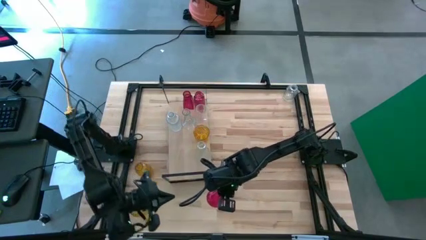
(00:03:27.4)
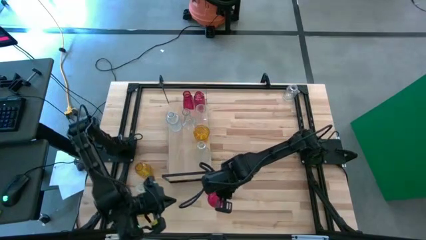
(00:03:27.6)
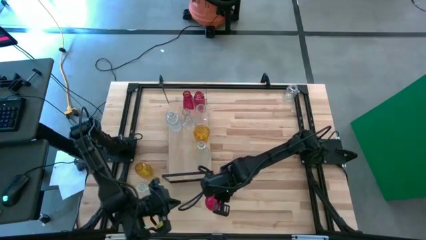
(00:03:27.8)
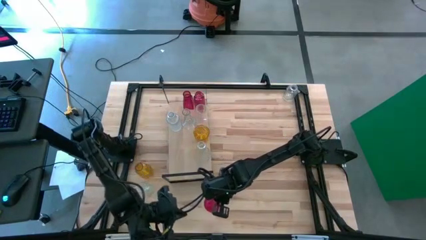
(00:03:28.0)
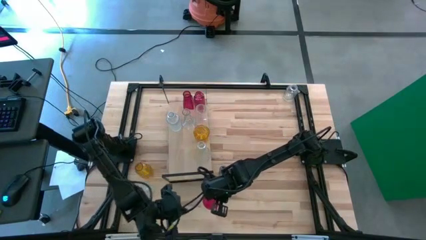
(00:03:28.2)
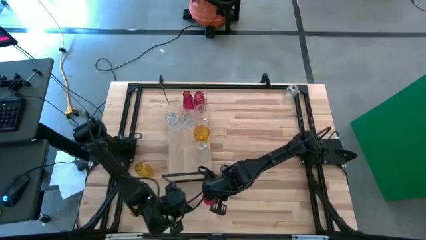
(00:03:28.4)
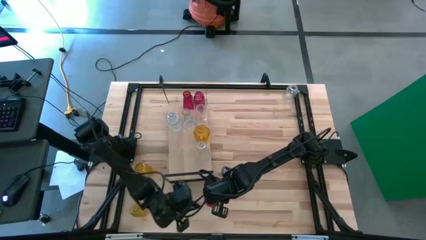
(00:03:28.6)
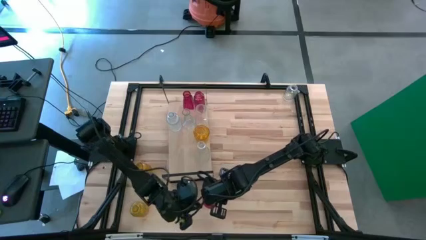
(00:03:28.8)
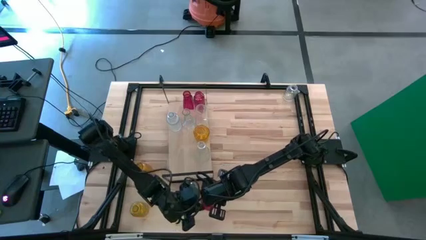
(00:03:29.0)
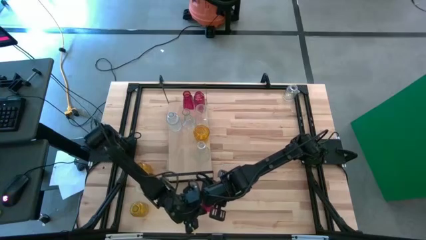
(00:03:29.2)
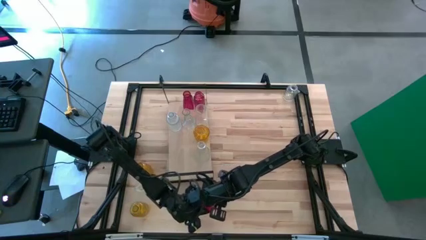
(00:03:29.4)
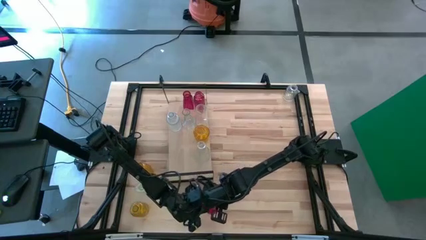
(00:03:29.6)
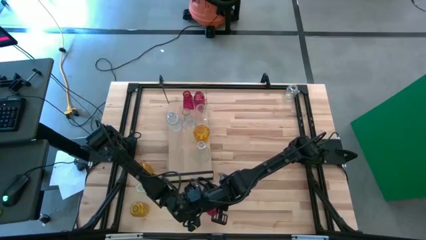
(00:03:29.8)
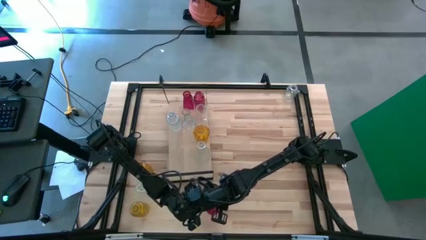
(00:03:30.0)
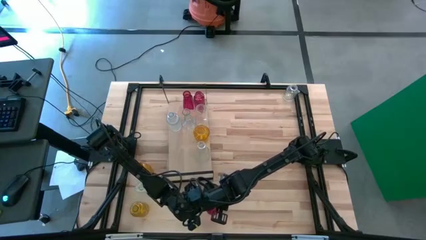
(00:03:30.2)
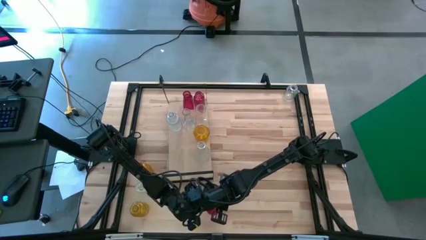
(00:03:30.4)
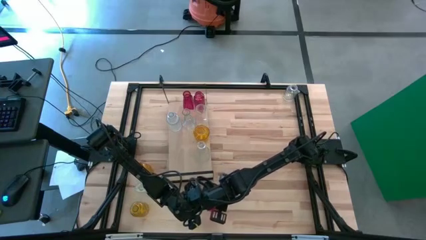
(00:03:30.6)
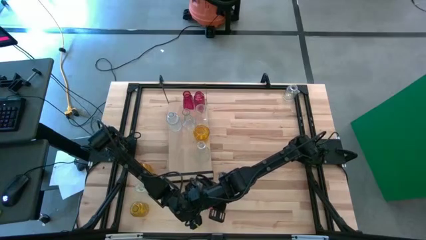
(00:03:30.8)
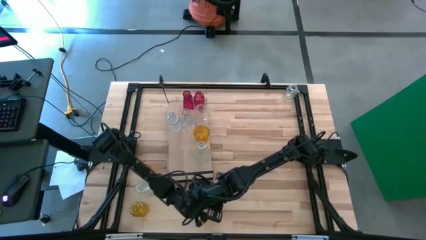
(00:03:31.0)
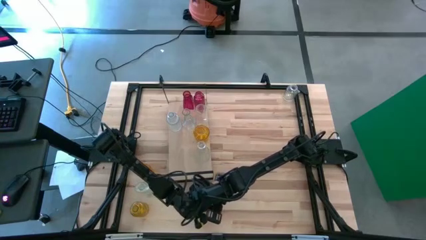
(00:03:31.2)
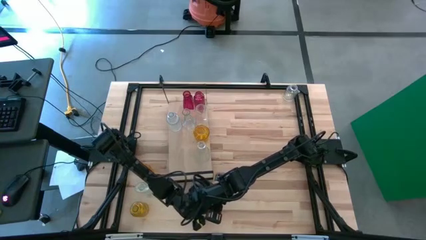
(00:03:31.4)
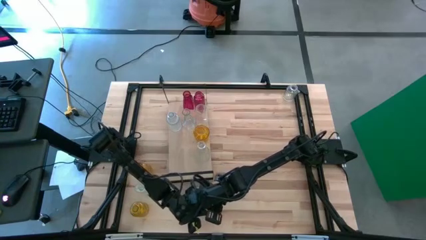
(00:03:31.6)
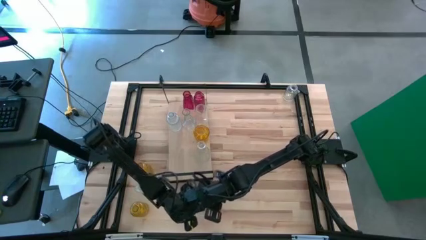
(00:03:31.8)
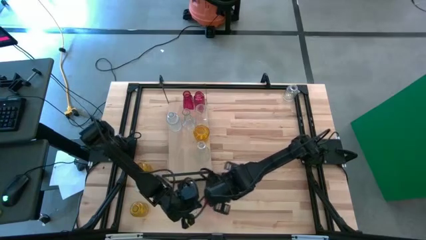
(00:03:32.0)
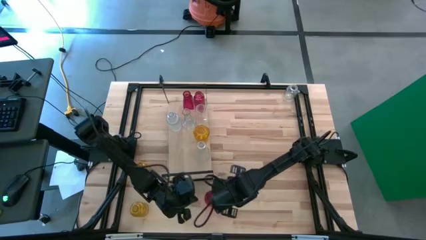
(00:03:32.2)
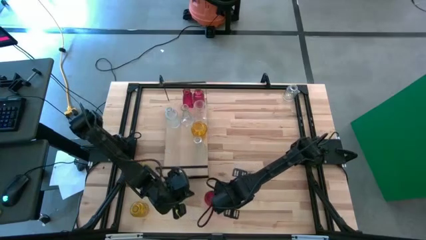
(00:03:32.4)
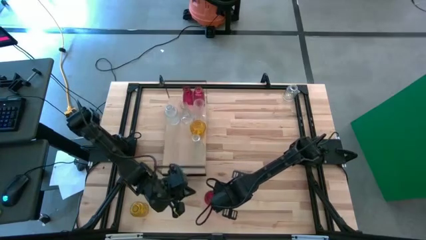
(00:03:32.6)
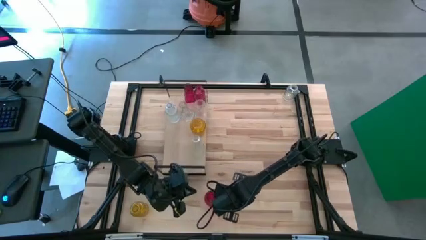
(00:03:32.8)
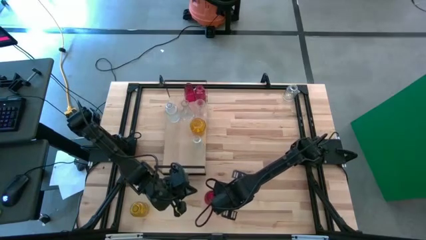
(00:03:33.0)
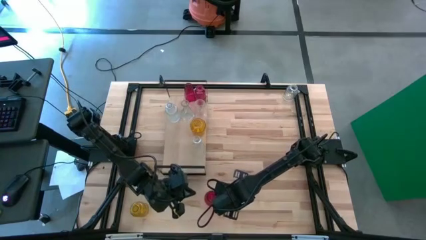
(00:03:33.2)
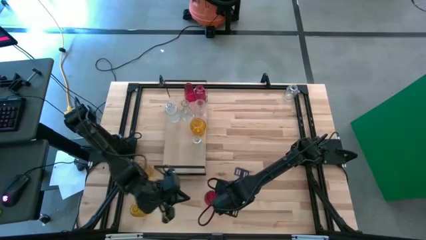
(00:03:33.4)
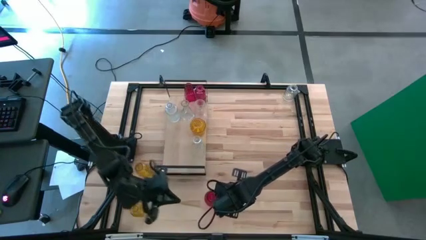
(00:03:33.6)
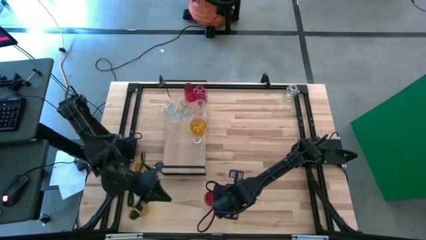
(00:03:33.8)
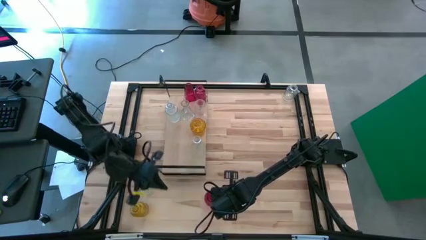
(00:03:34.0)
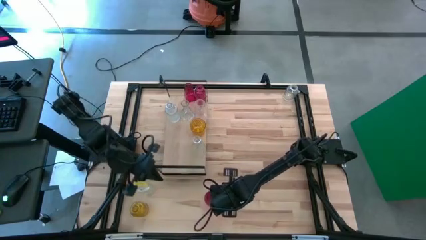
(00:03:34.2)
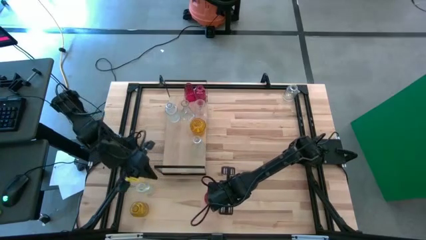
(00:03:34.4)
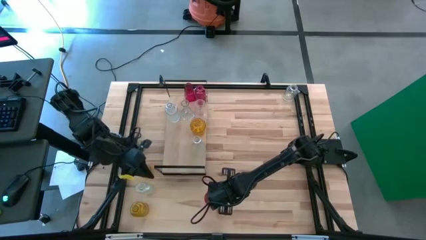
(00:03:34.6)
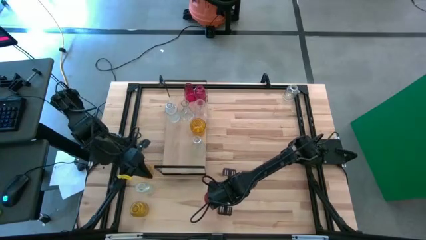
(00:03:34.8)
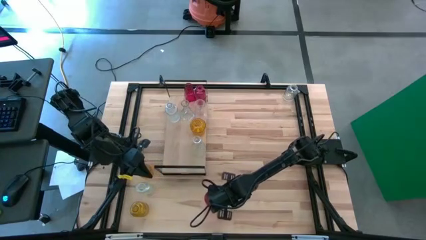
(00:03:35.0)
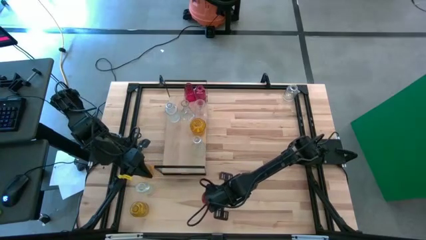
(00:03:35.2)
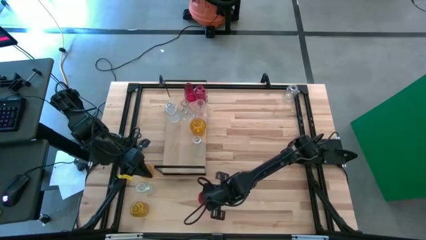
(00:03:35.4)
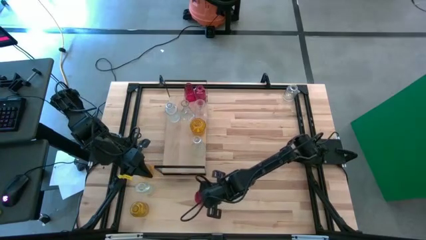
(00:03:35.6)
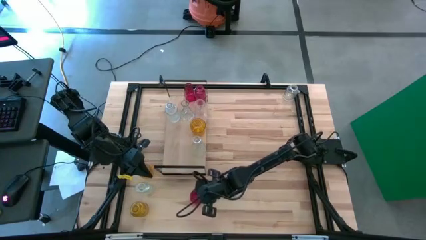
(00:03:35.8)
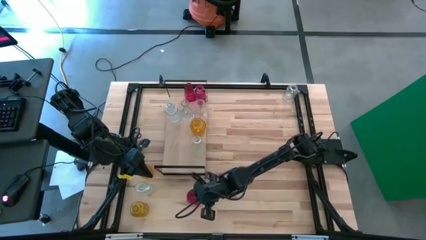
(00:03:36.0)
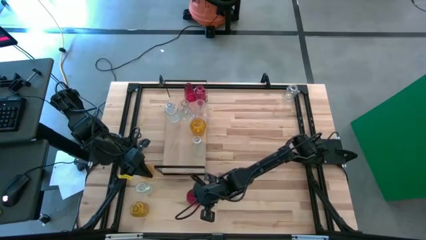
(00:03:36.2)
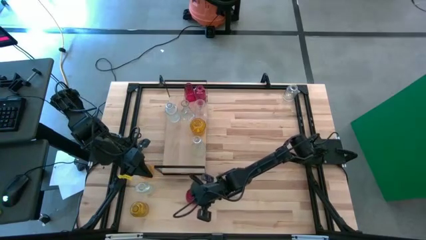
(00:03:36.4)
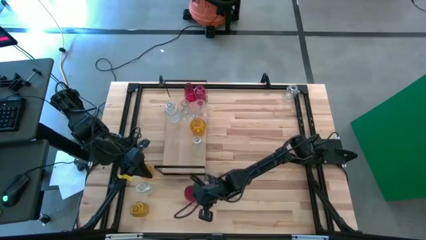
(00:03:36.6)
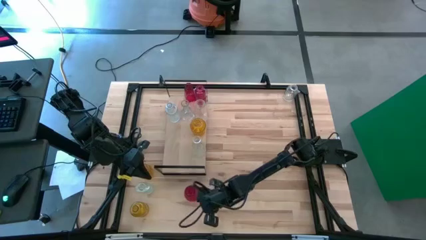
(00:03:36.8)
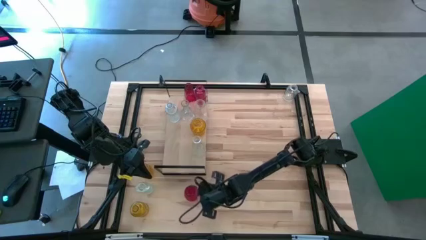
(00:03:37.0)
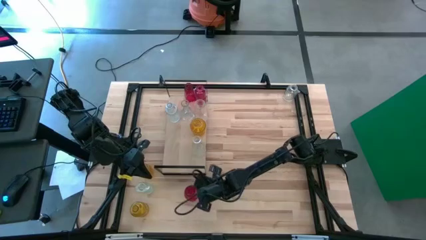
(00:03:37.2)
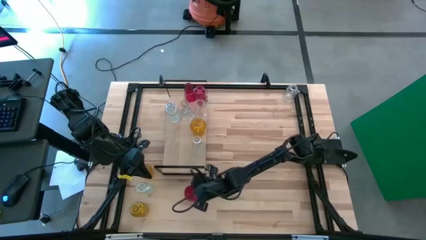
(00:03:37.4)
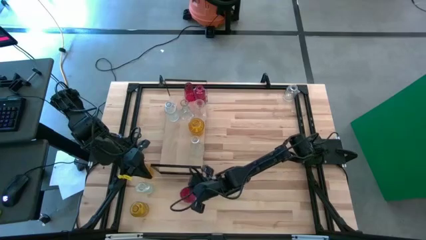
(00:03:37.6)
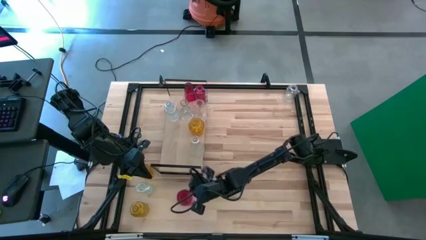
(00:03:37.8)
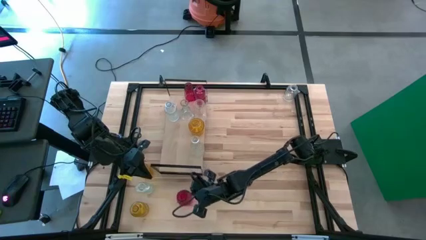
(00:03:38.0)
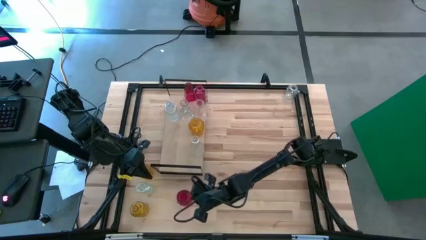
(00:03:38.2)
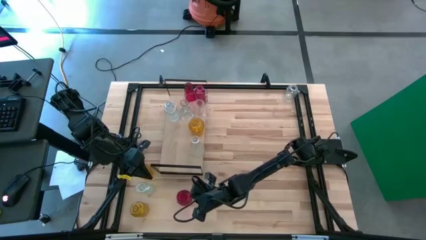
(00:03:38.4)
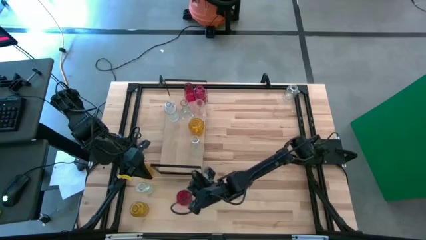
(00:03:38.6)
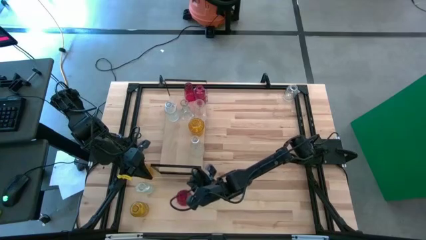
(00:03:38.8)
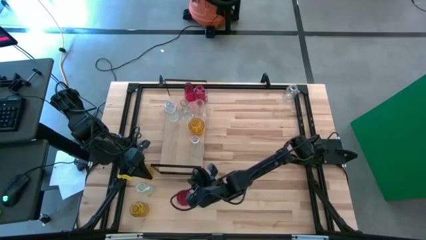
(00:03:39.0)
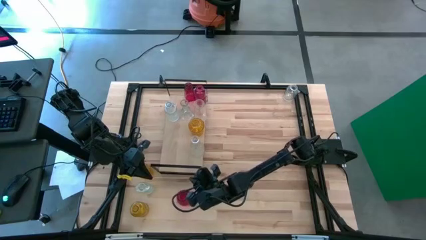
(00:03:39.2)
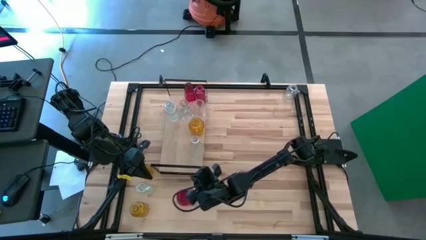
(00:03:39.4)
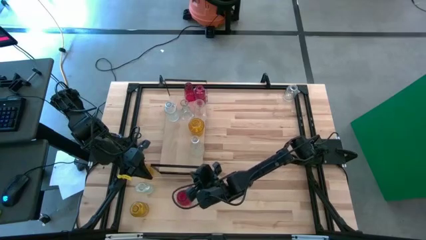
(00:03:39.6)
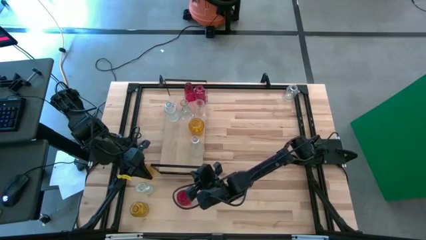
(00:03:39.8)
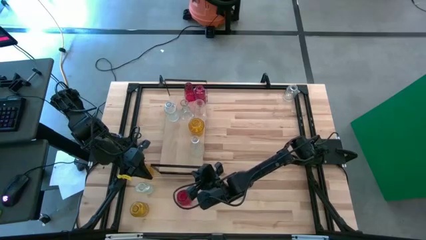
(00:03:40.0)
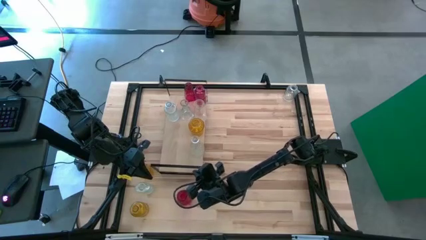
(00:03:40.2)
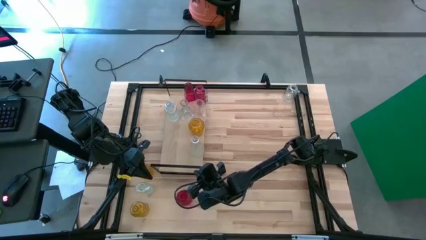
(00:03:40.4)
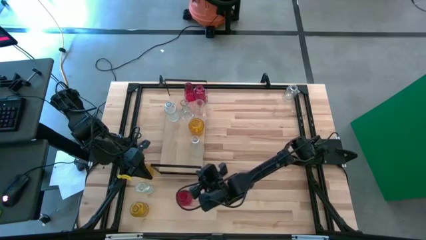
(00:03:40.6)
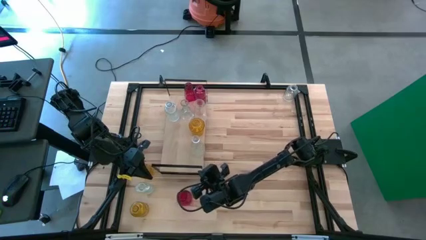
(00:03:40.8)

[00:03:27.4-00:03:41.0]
Task: sort vases onto shelf
Put the red vase on the shelf aligned with the other red vase

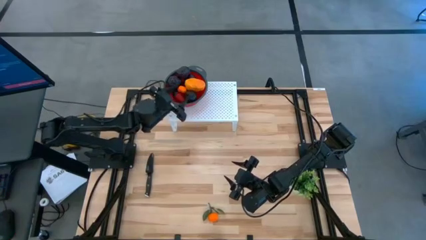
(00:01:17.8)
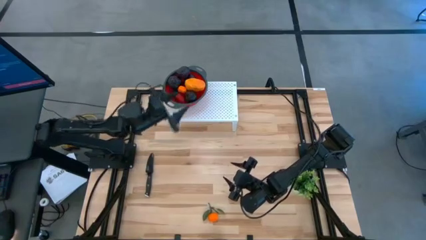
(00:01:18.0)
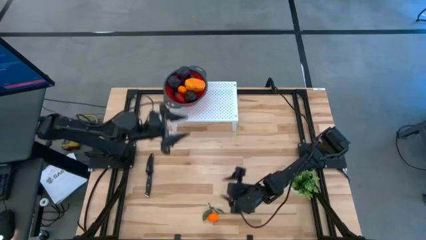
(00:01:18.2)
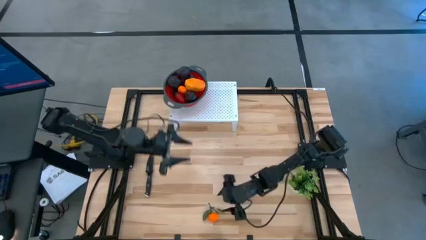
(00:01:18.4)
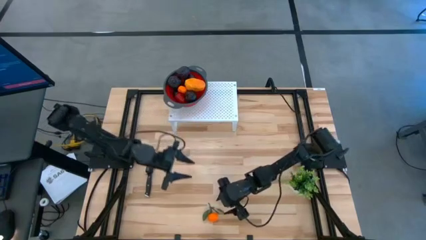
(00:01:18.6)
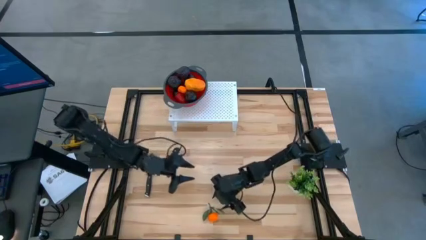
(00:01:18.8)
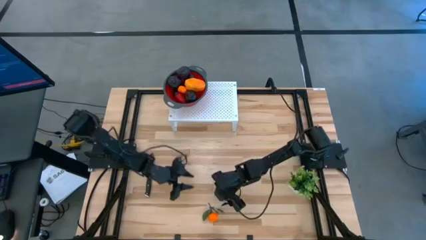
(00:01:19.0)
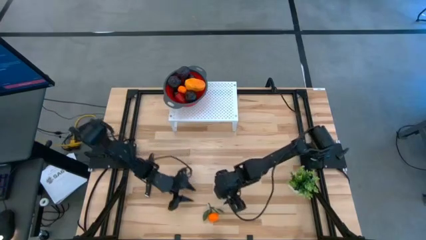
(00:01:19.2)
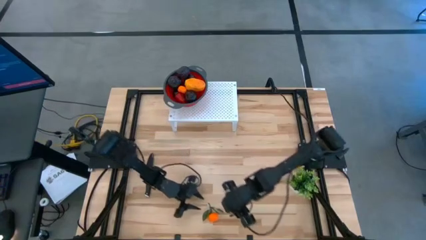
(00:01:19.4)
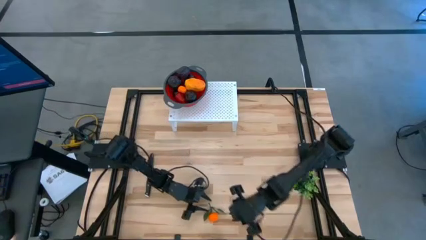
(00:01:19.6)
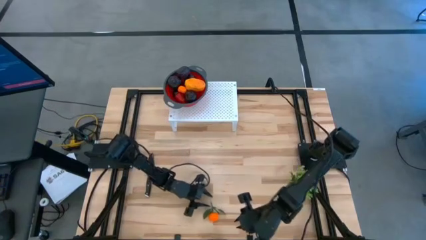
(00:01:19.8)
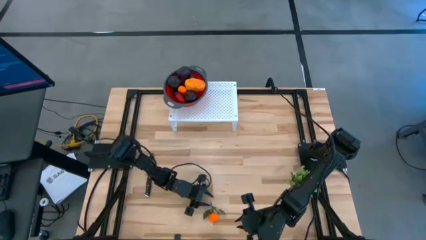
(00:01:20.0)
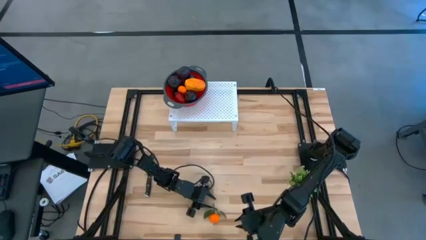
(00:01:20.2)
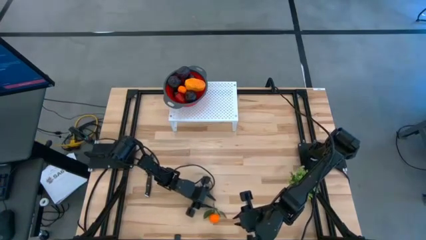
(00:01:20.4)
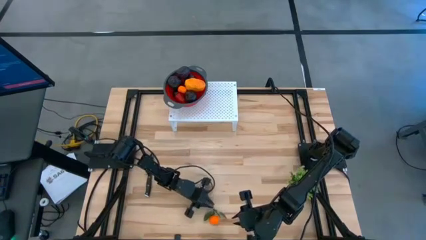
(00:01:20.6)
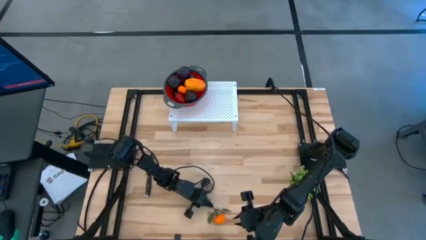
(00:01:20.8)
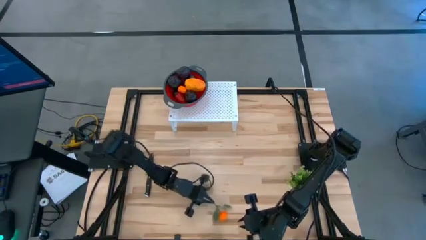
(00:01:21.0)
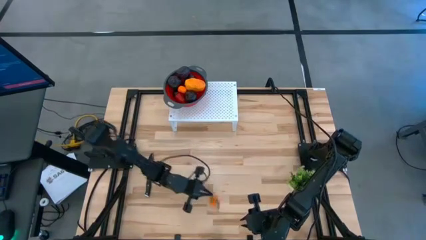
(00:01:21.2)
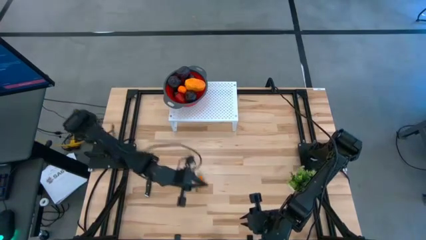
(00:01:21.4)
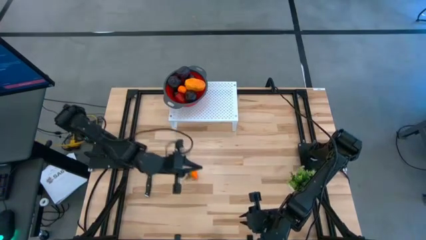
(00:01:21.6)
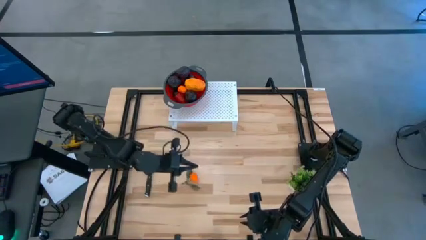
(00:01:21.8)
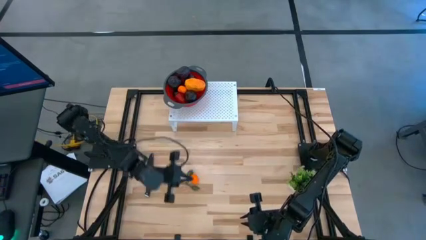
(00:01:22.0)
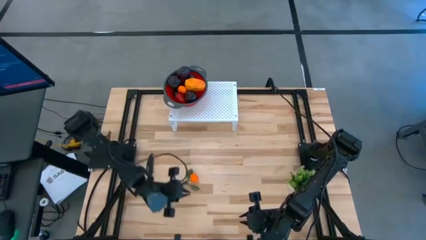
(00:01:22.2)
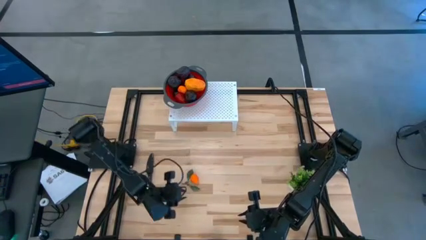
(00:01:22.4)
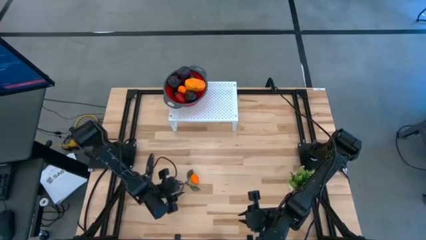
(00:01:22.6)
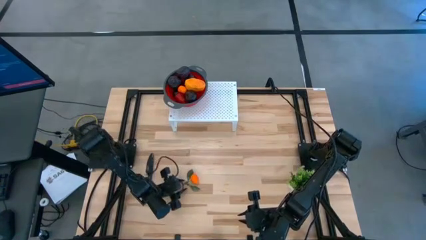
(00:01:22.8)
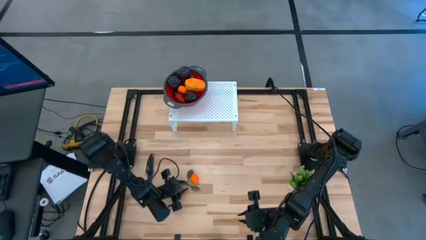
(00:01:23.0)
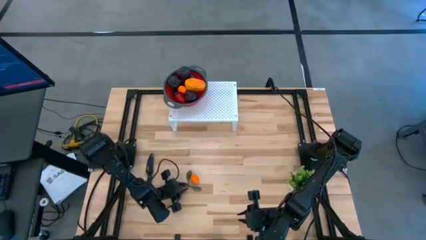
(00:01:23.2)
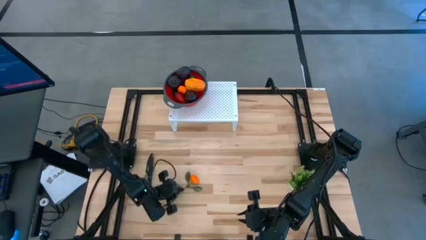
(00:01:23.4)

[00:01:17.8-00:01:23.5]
Task: Pick & Place Fruit
Put the orange into the red strainer bowl on the shelf
